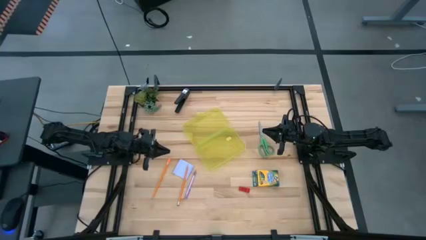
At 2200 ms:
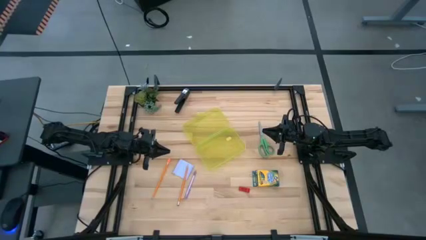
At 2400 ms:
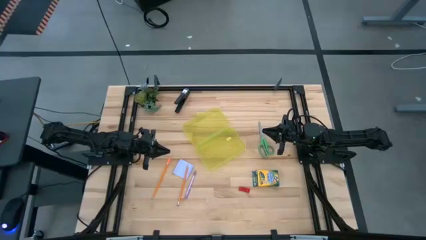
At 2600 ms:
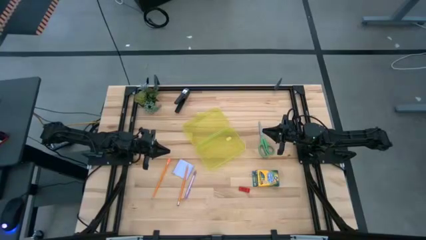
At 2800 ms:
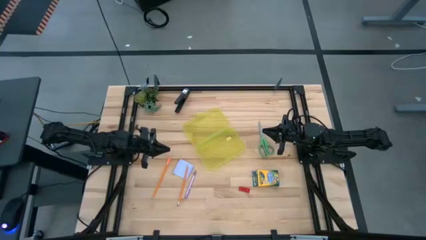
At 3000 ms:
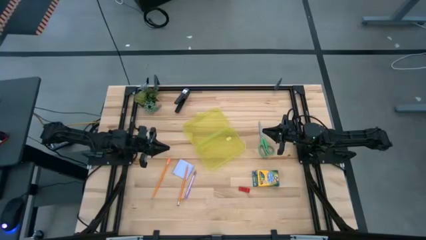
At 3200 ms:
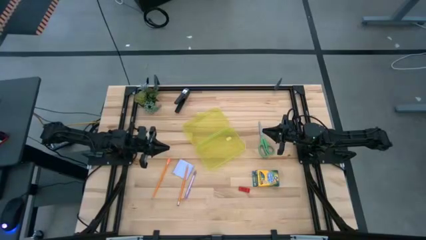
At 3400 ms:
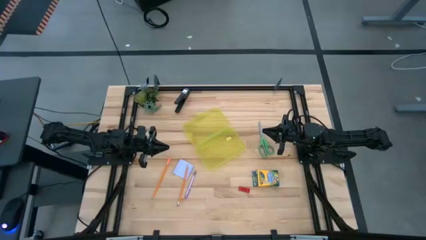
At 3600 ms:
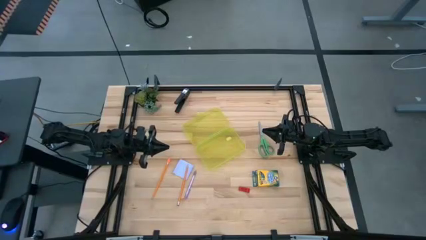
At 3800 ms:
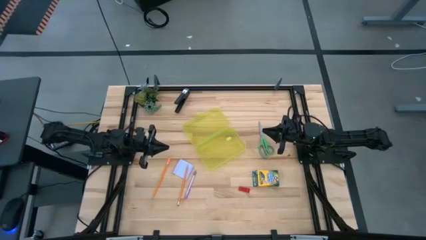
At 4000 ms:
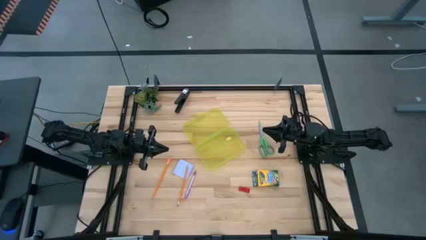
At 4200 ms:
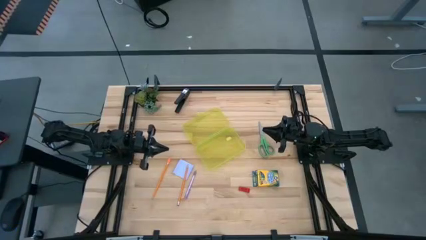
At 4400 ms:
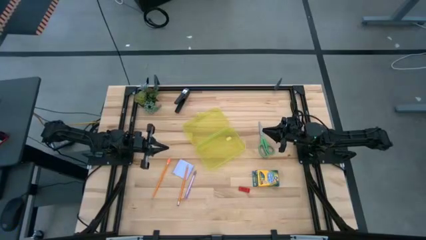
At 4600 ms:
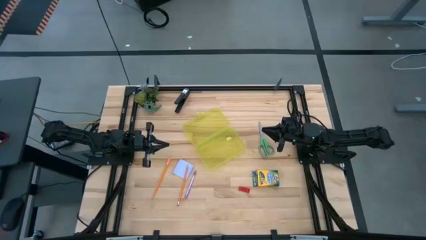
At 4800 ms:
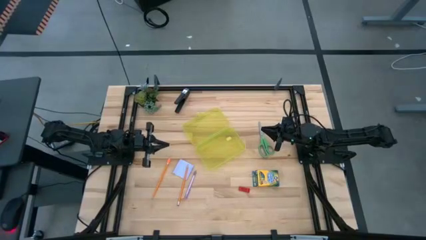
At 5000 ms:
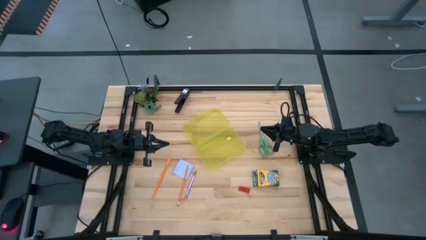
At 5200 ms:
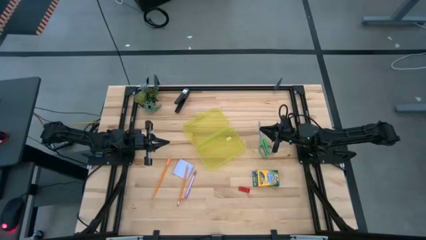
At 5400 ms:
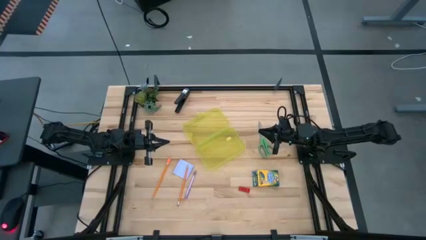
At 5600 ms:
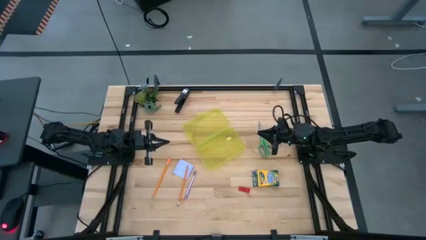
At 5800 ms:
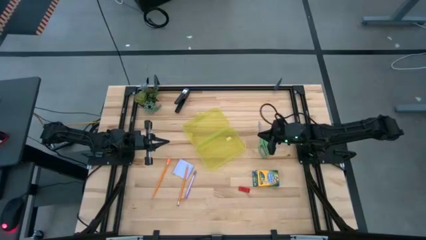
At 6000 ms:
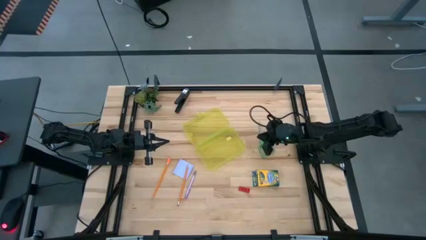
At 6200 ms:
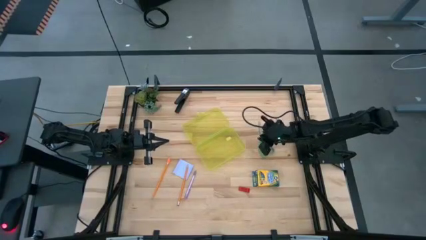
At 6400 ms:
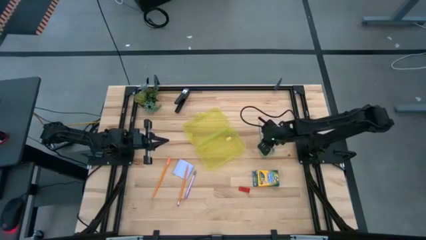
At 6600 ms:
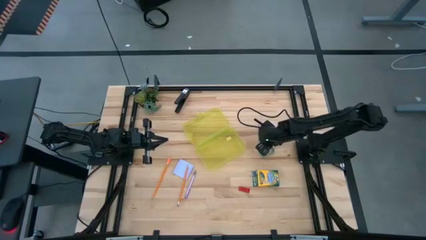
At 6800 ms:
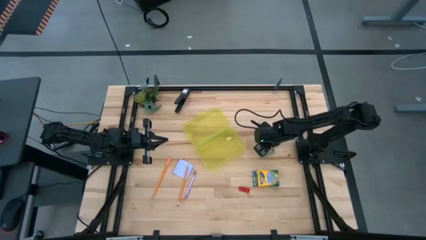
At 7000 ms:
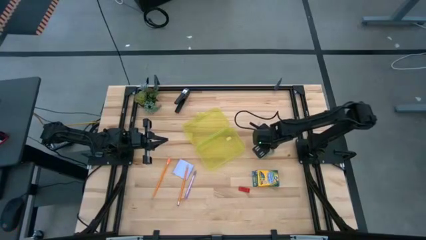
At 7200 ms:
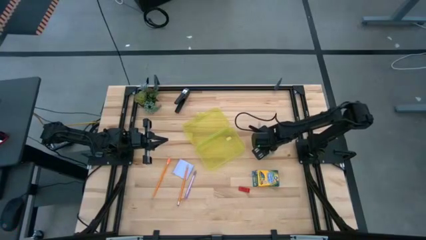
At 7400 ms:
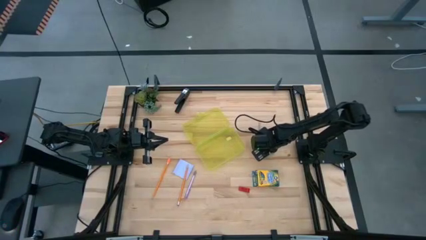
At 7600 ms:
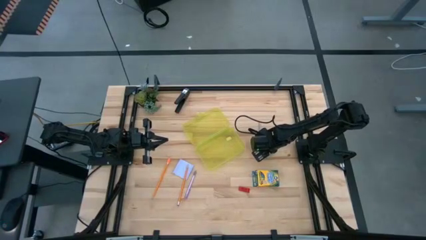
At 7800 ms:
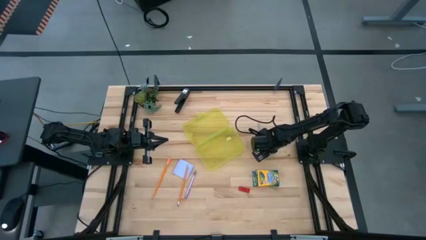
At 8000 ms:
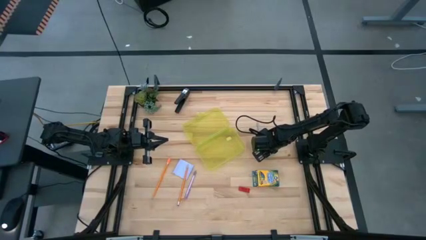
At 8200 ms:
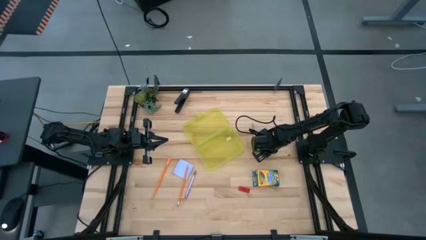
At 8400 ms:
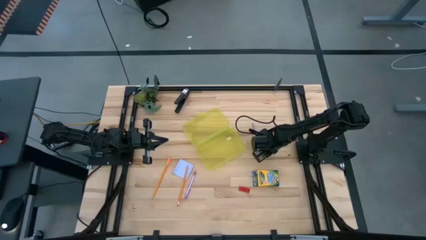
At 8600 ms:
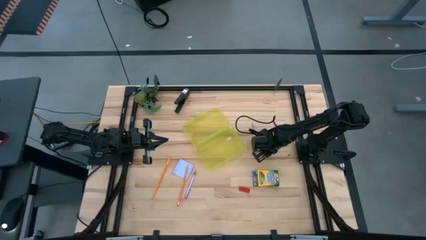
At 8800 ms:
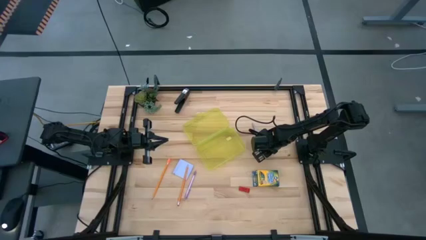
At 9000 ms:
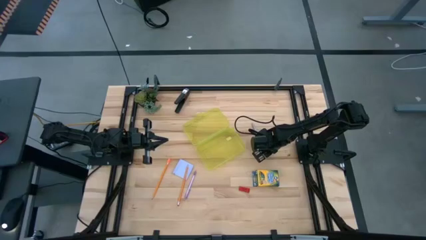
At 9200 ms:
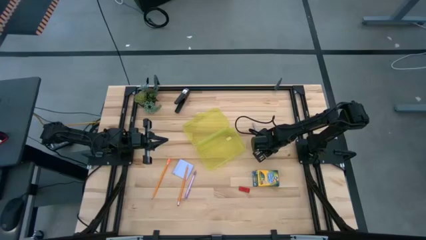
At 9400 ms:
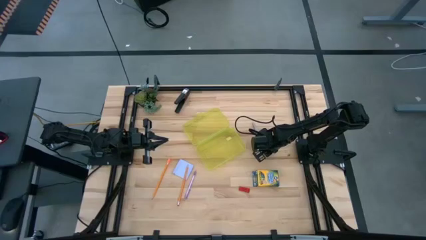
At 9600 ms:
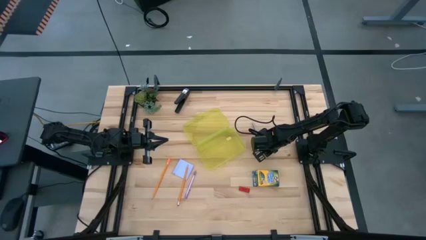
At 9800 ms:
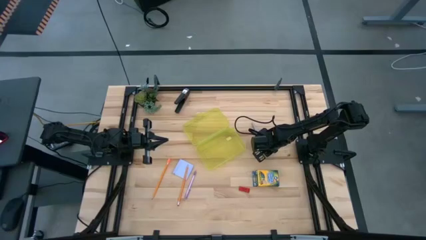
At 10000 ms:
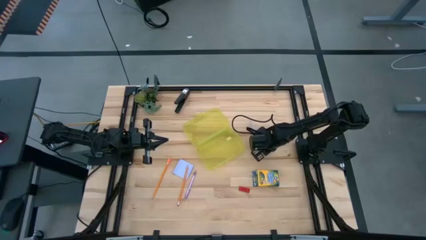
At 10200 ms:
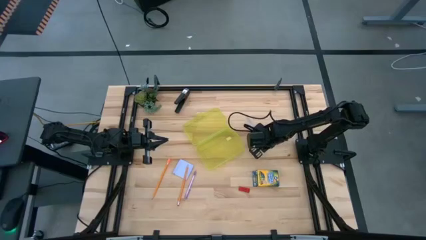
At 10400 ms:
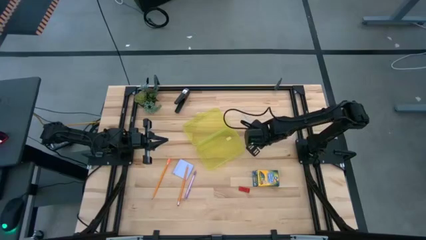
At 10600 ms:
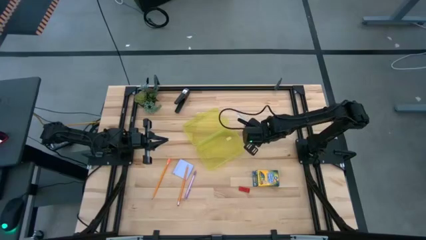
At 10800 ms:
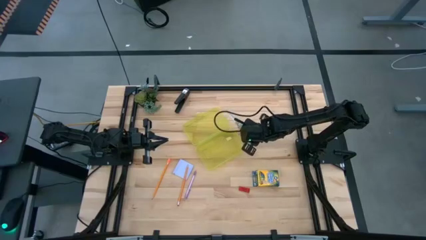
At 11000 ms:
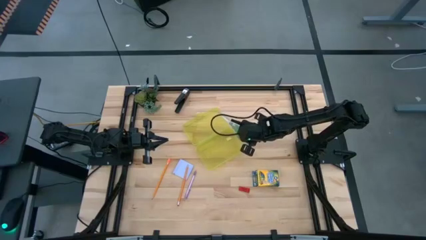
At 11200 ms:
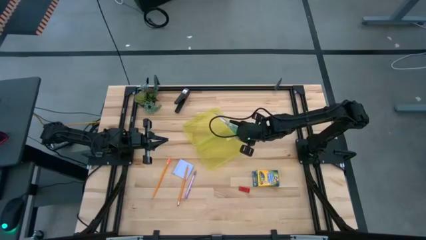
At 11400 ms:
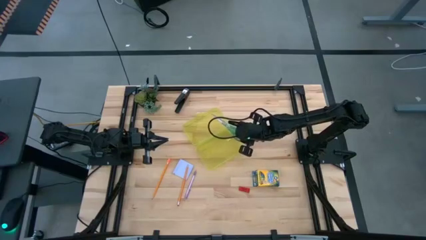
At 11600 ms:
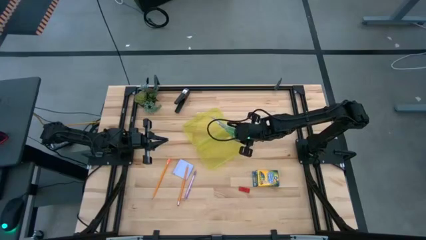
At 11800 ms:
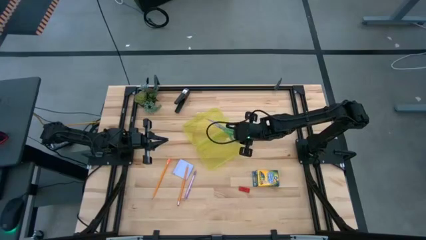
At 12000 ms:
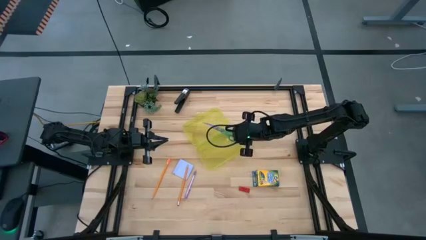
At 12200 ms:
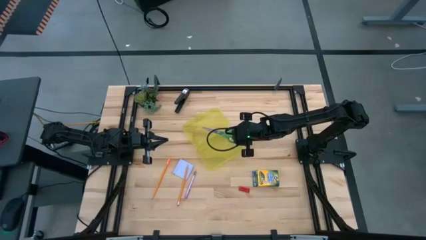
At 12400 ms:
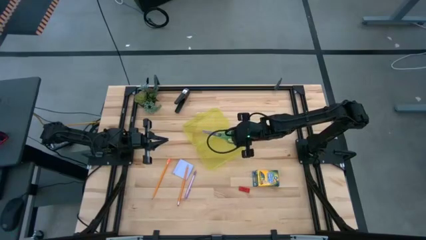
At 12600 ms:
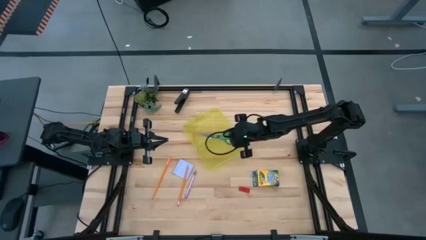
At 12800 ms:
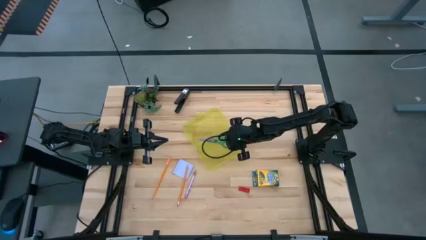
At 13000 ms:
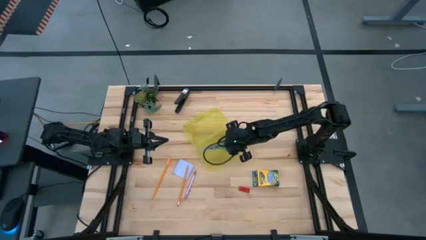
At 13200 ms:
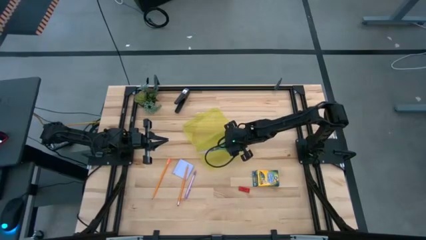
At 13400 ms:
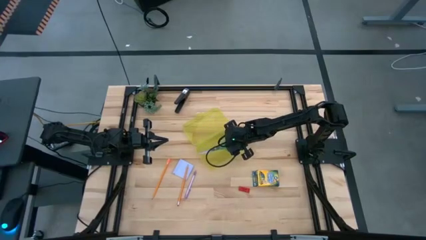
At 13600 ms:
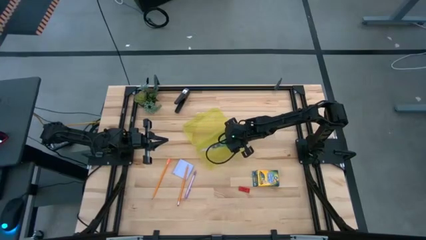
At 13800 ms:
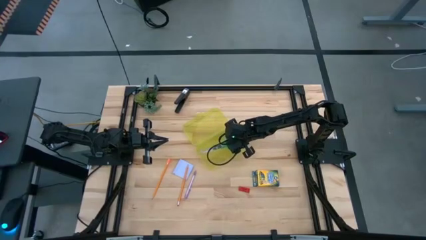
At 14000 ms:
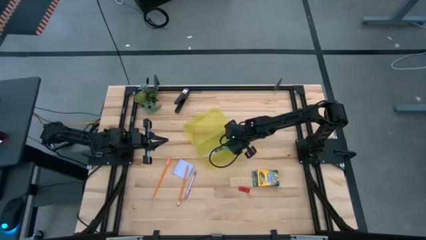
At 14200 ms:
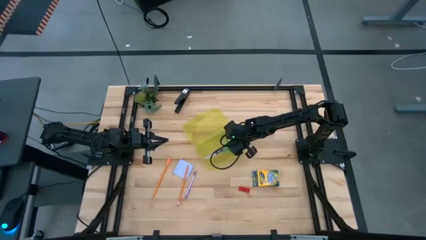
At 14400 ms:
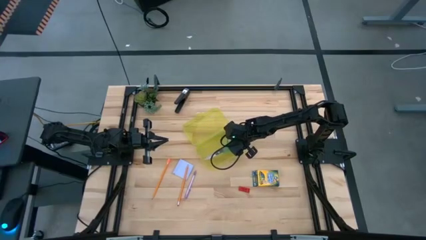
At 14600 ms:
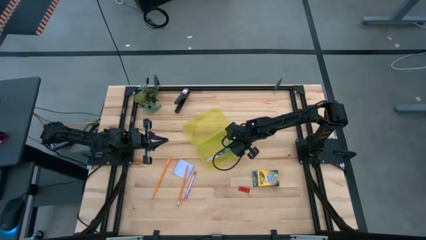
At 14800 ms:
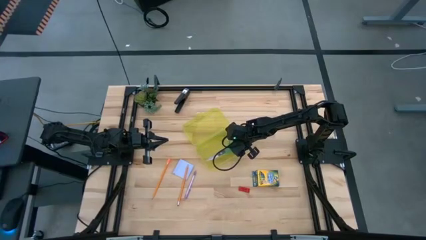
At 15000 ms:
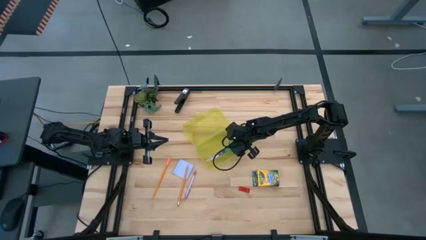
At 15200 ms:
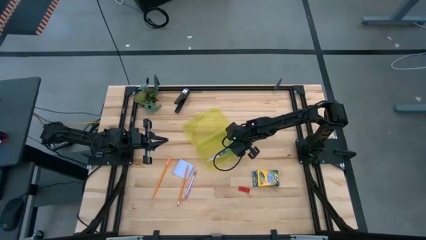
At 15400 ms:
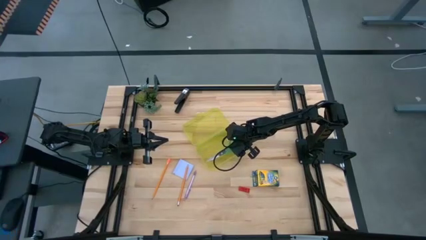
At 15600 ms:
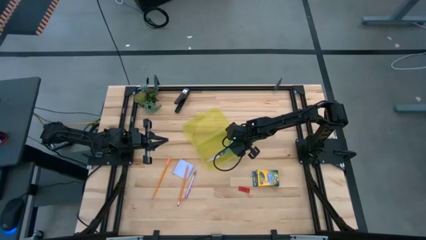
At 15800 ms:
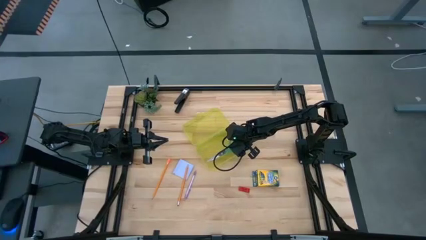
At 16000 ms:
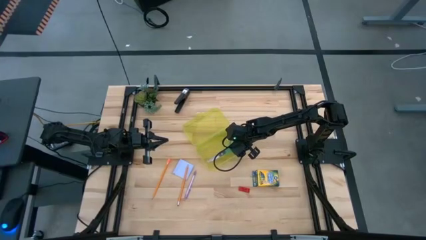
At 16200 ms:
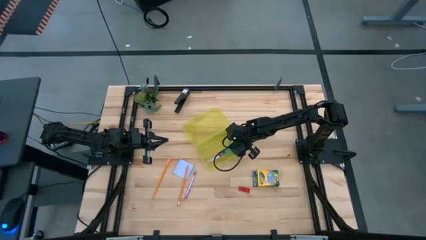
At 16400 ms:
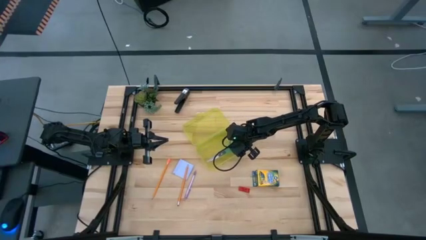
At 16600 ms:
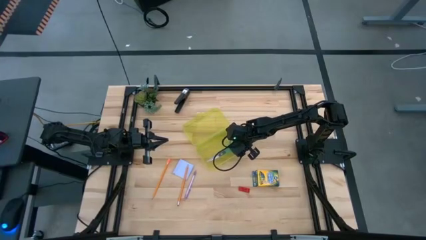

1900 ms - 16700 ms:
Task: Pack school essentials
Put the green scissors into the yellow supply box
